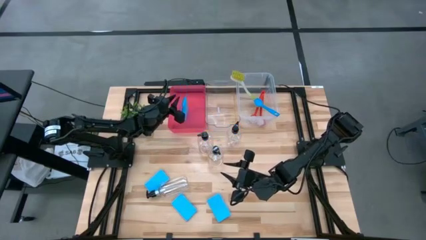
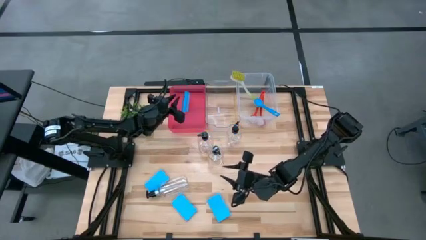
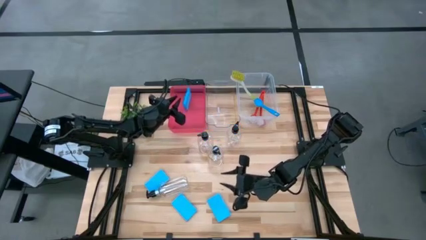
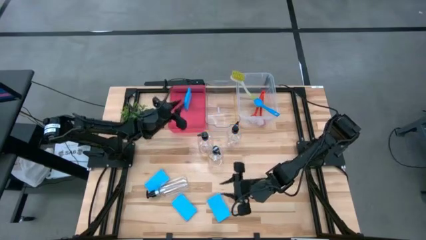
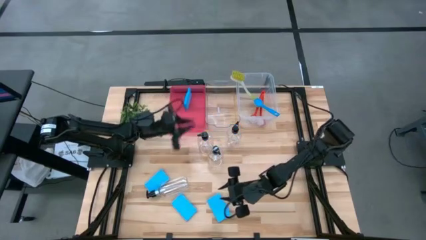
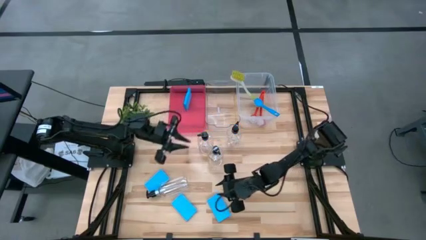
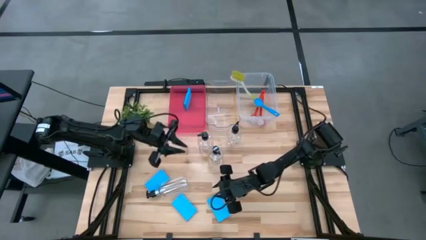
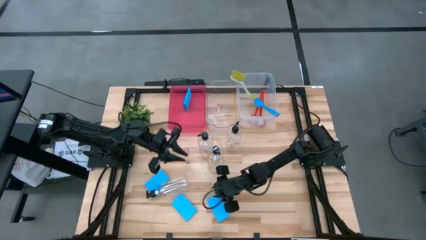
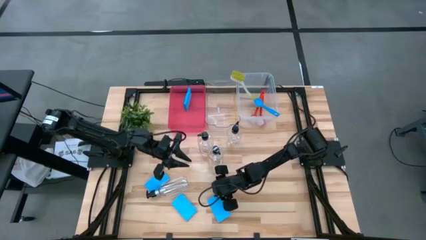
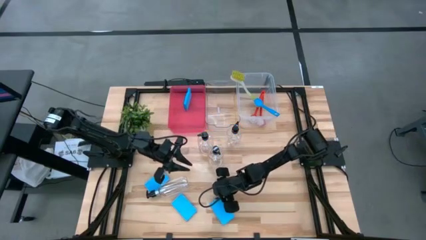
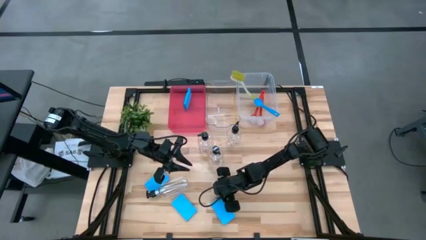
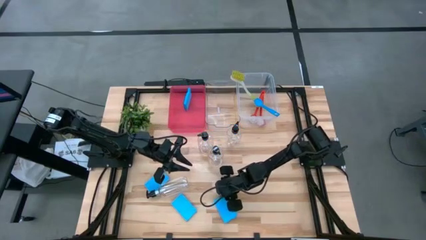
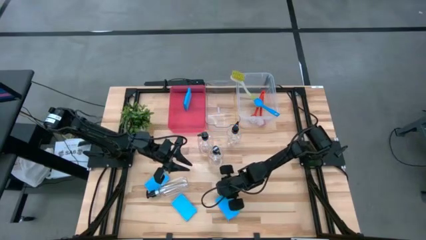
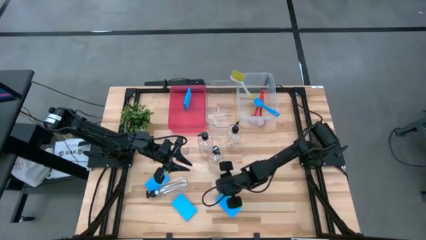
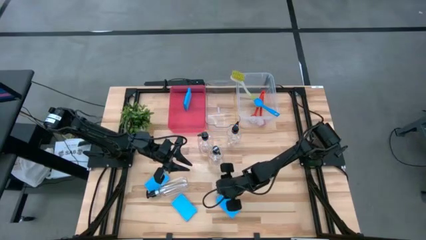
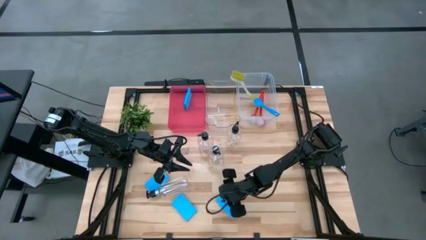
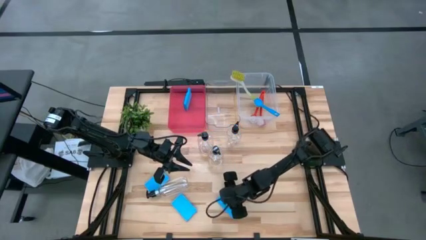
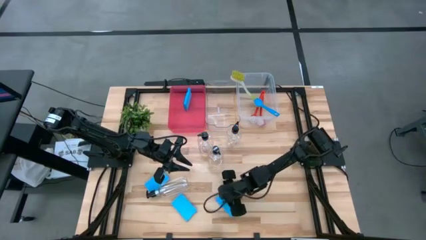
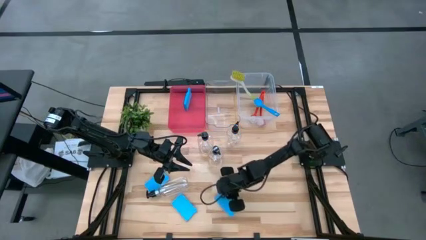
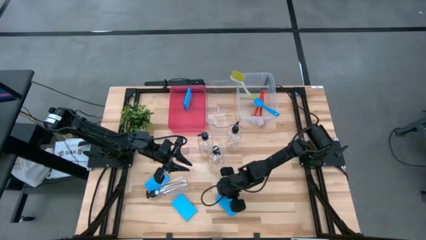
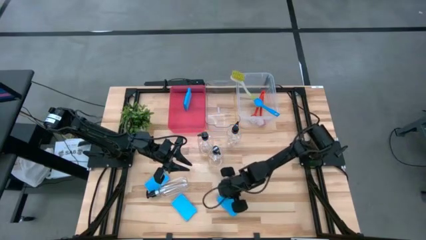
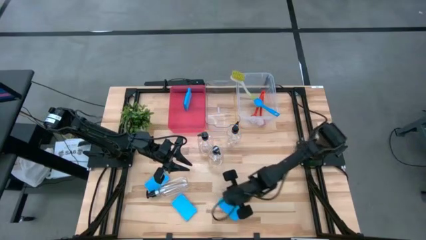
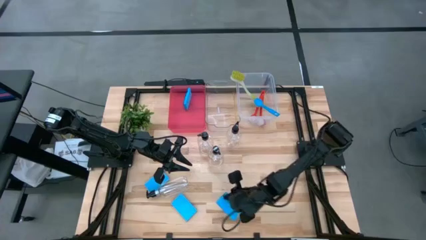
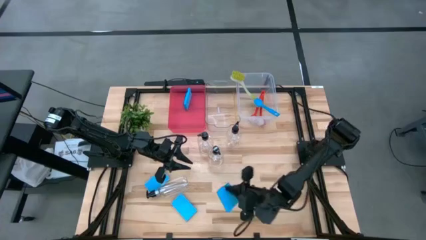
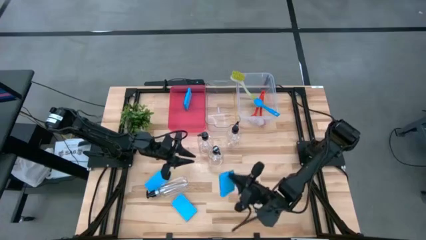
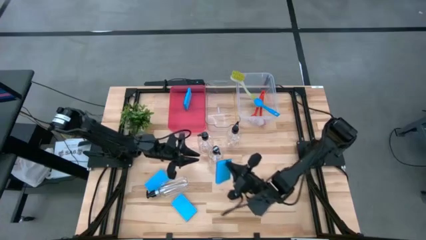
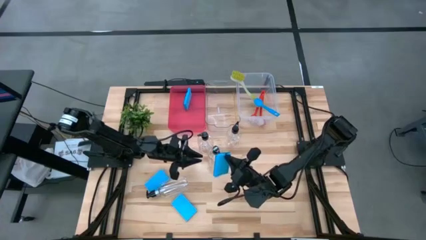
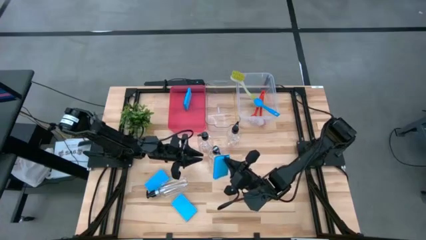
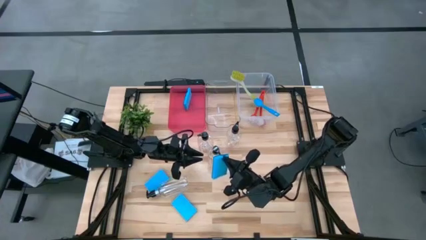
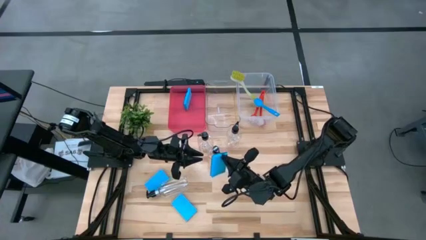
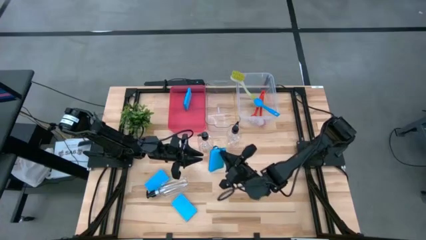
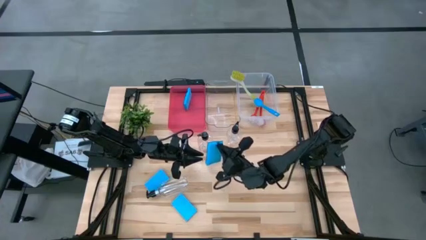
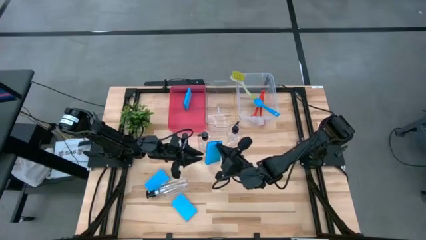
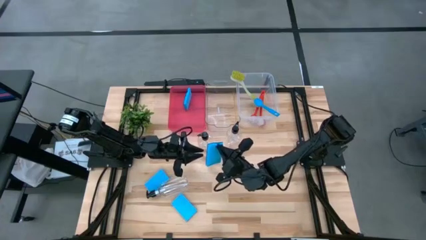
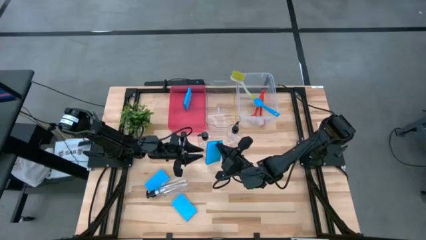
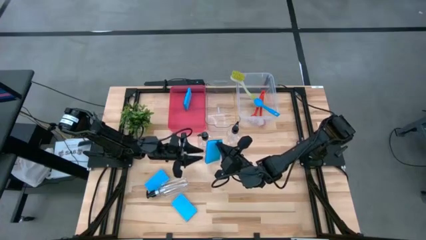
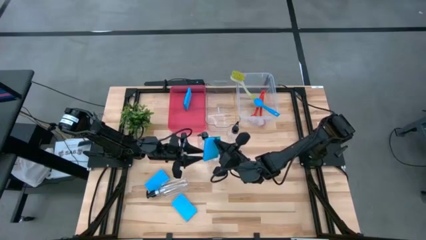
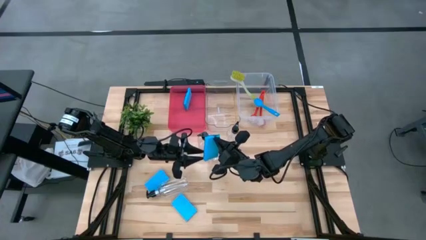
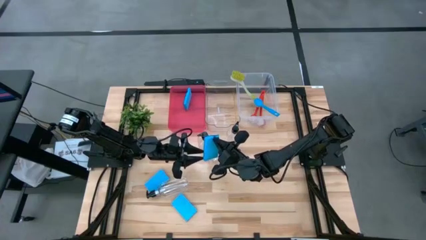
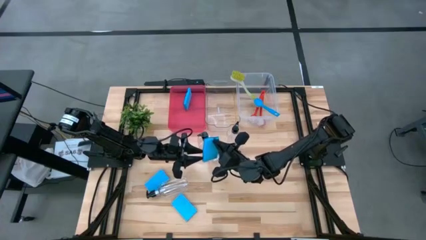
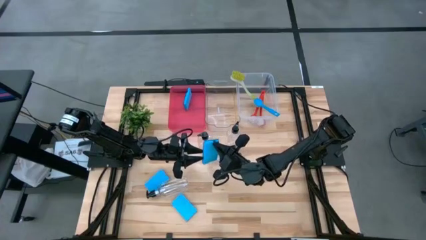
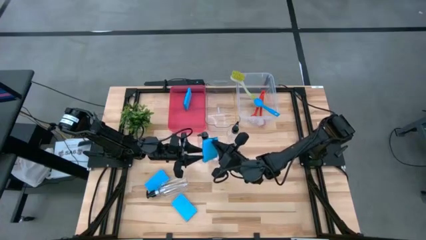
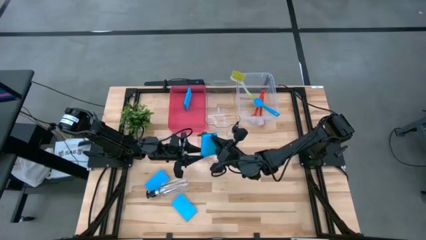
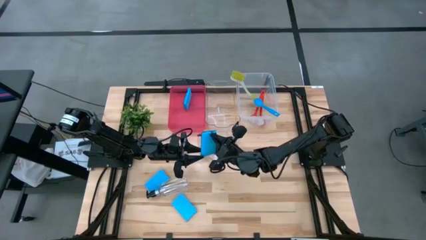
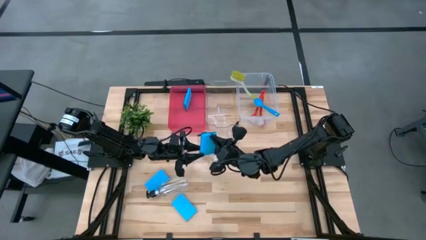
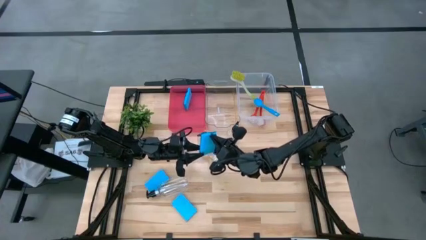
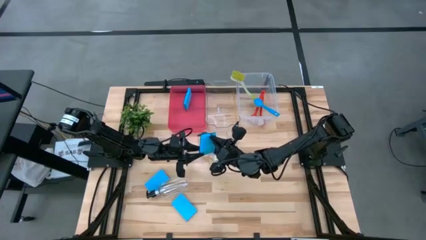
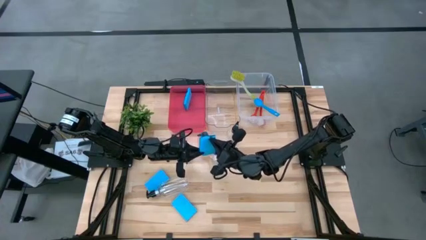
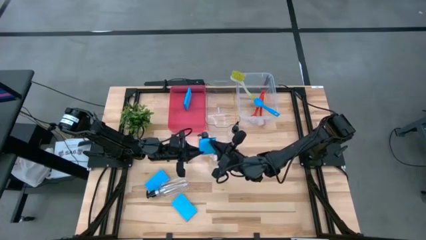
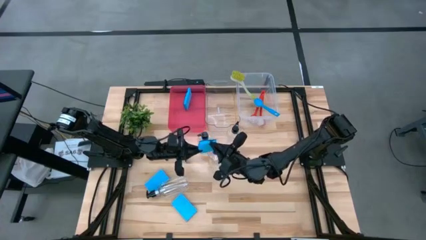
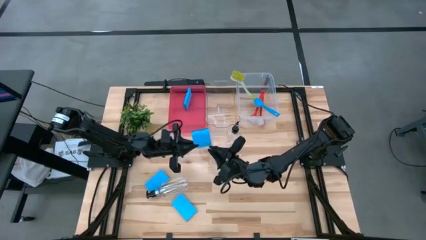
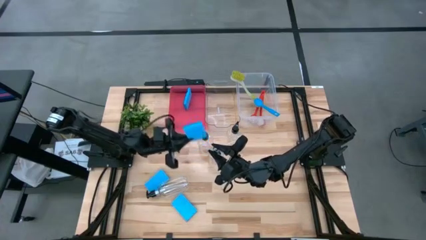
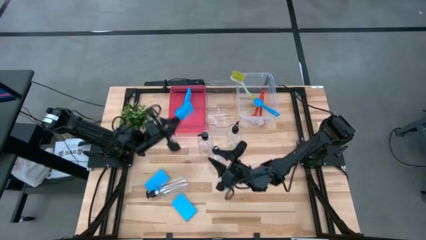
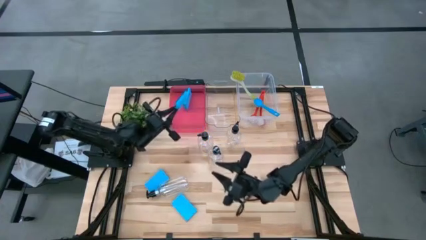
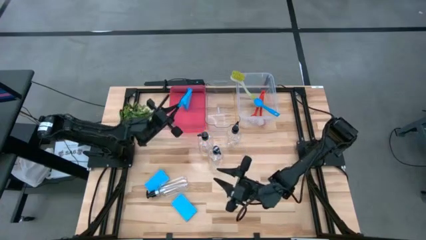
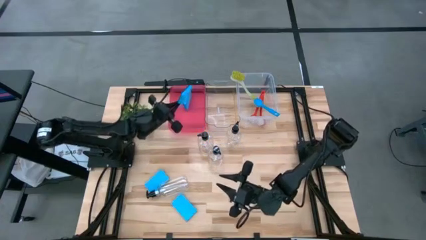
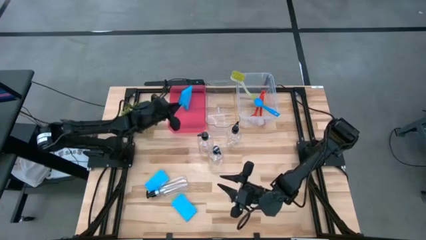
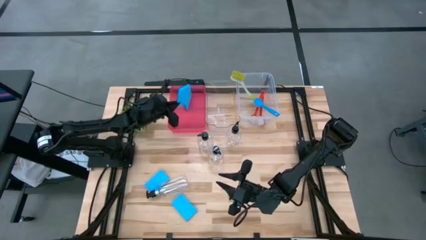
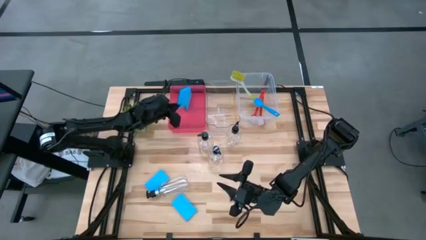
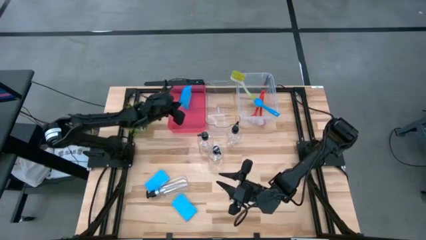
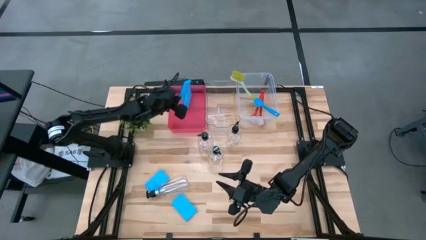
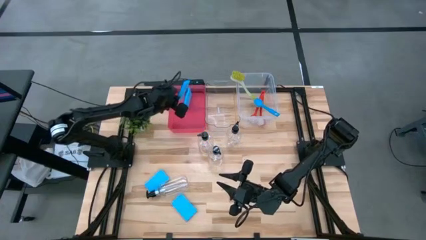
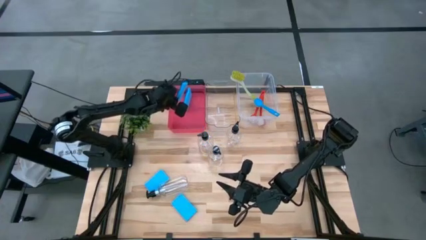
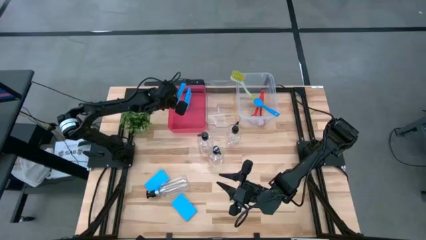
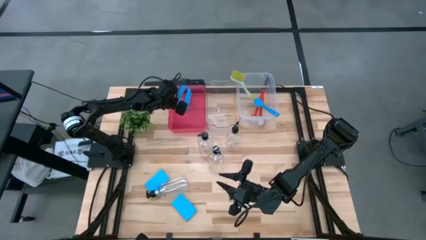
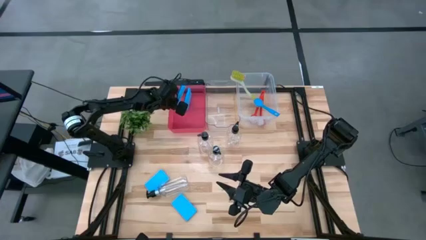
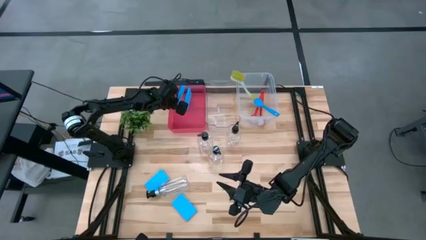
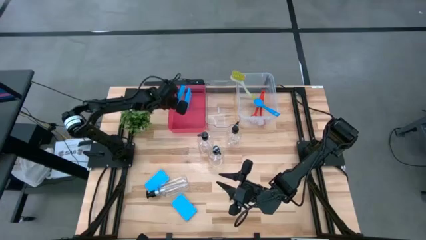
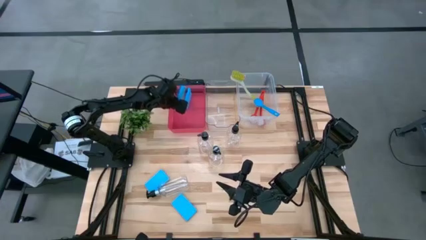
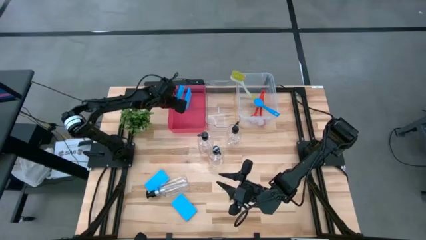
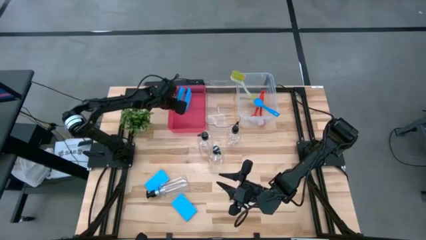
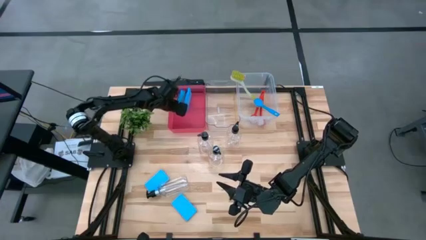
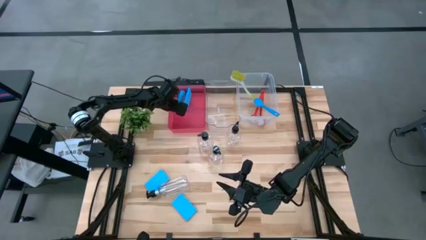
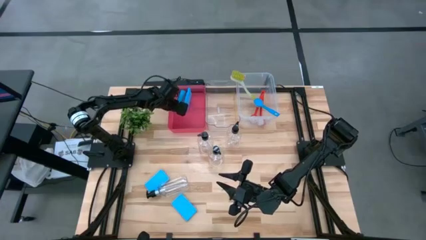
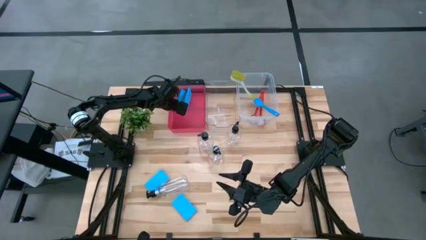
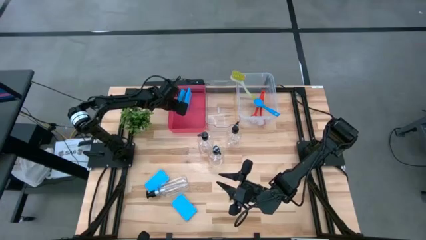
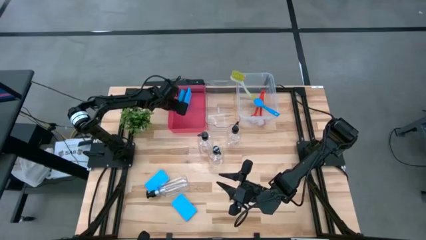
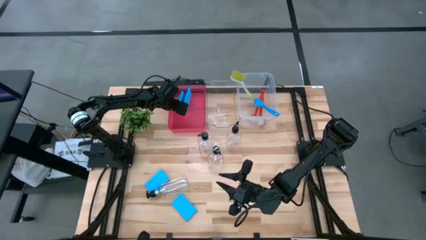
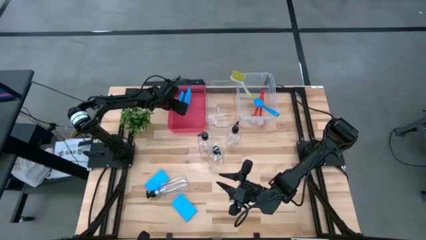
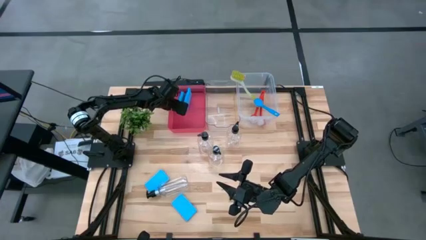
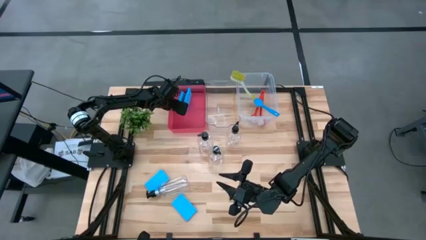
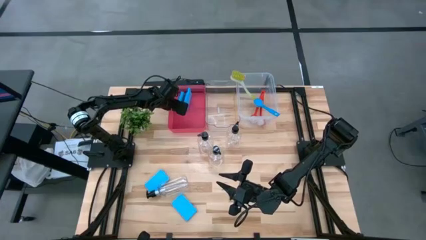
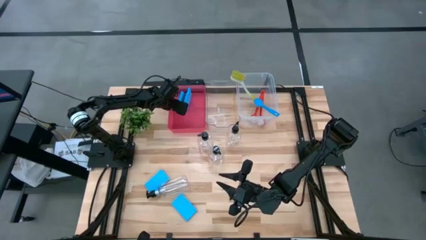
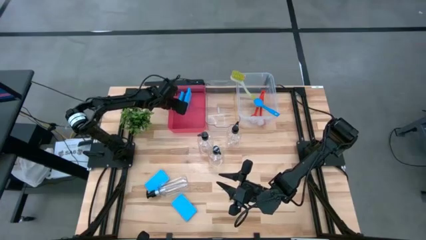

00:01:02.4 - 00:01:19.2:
Task: Pick & Place Kitchen Sink Supplies
Put the blue sponge into the red bin

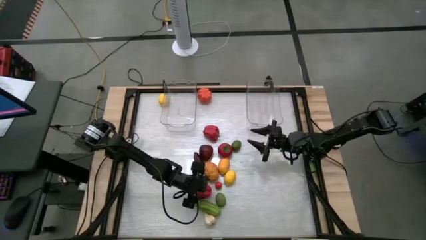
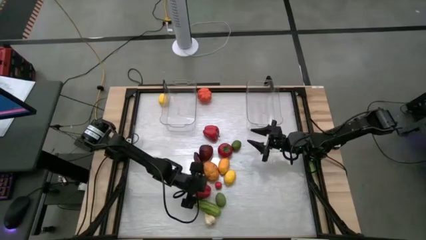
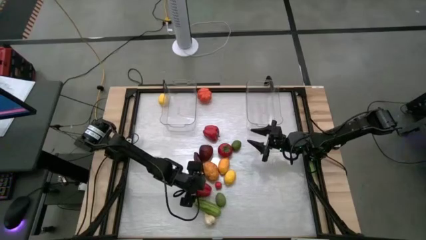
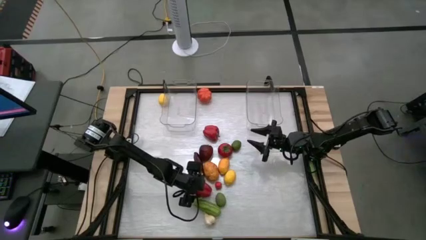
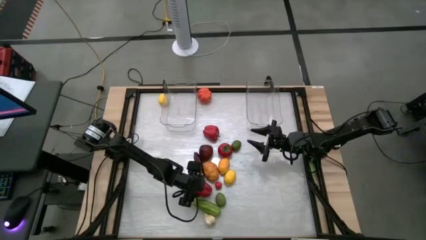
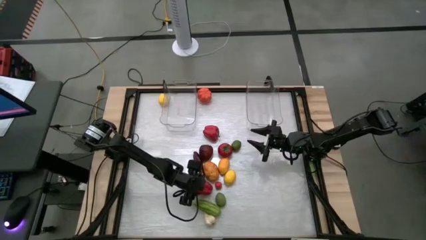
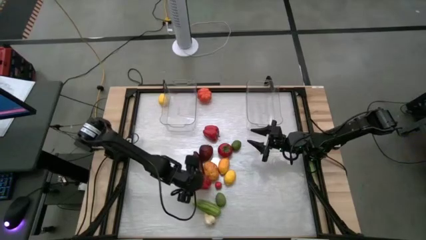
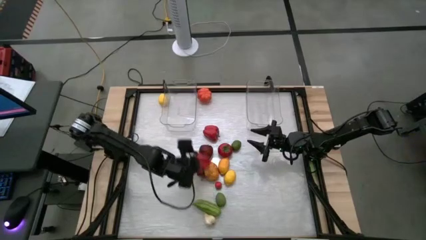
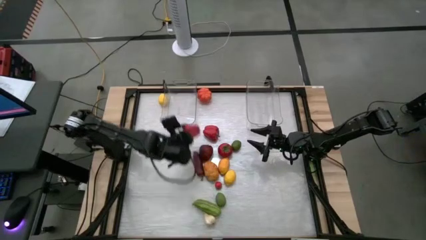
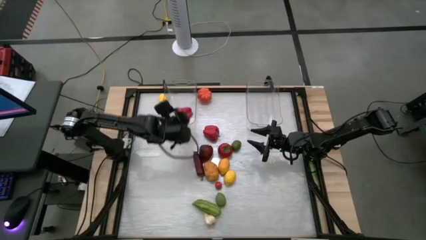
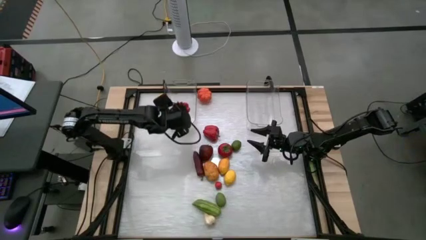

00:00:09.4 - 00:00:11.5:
Task: Sort produce into baskets
Put the bottom bell pepper into the left transparent bin
